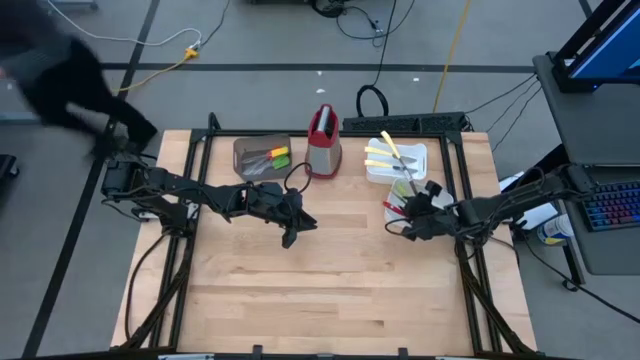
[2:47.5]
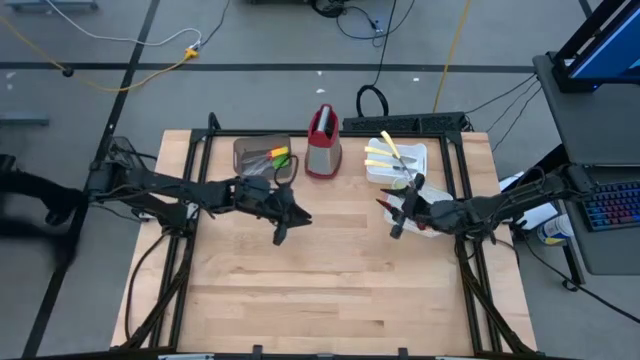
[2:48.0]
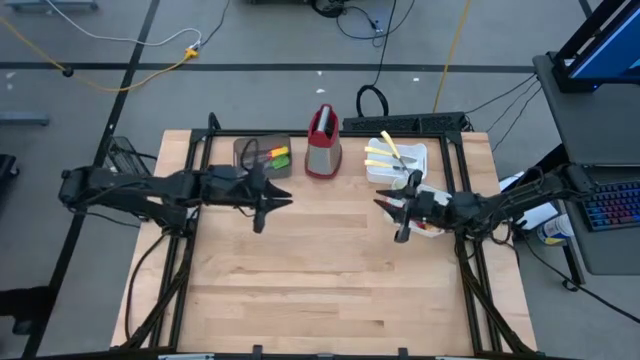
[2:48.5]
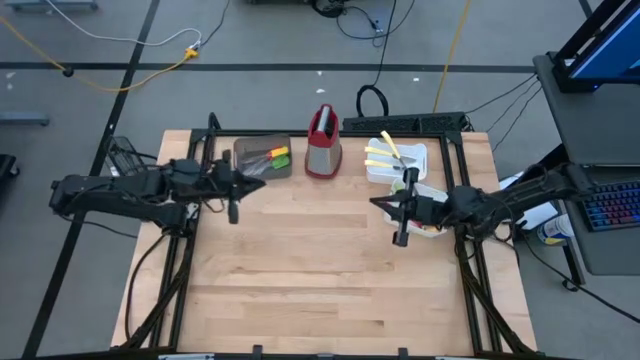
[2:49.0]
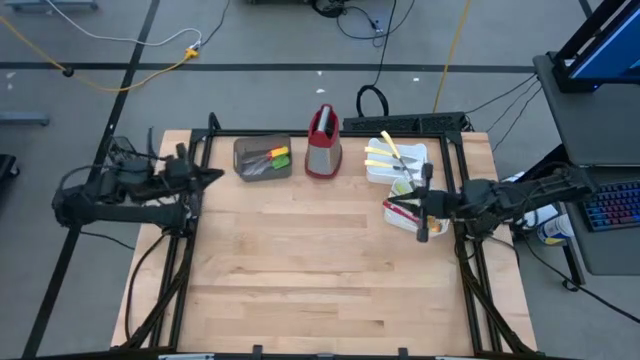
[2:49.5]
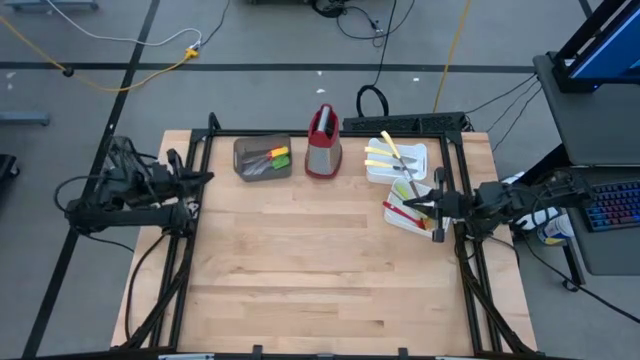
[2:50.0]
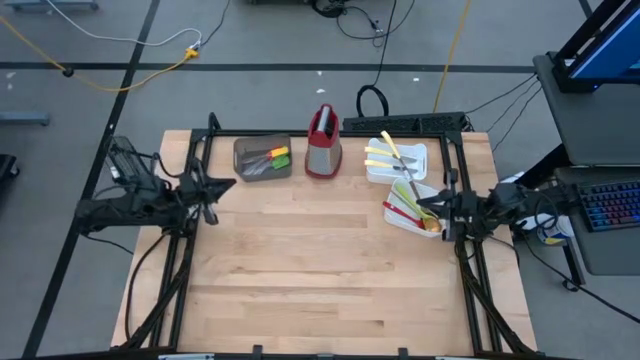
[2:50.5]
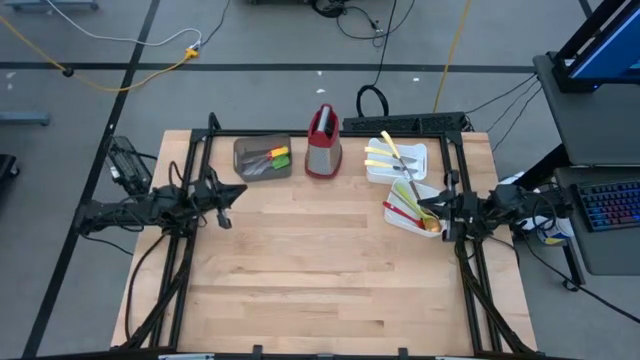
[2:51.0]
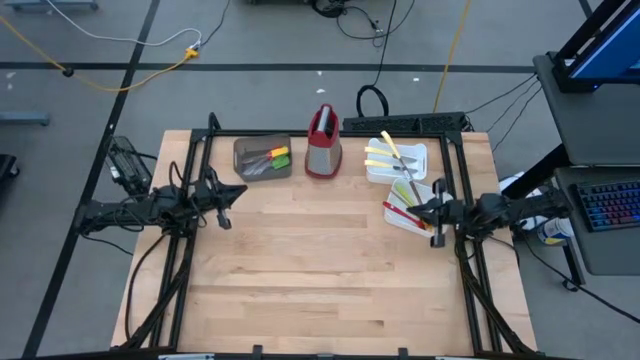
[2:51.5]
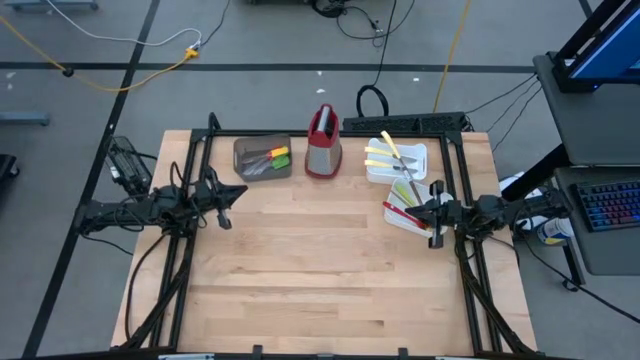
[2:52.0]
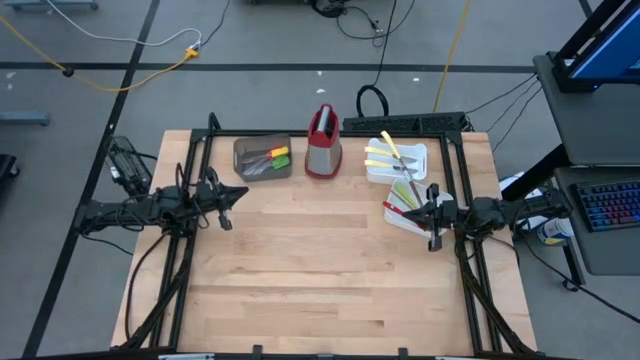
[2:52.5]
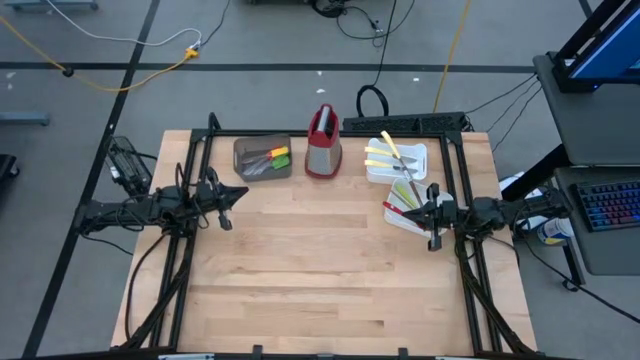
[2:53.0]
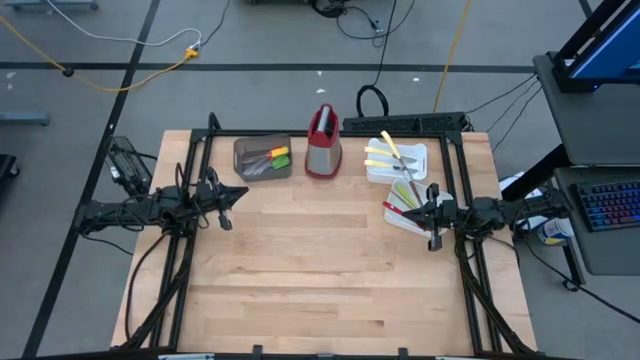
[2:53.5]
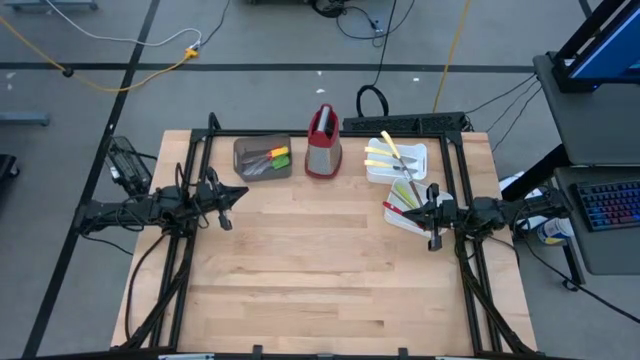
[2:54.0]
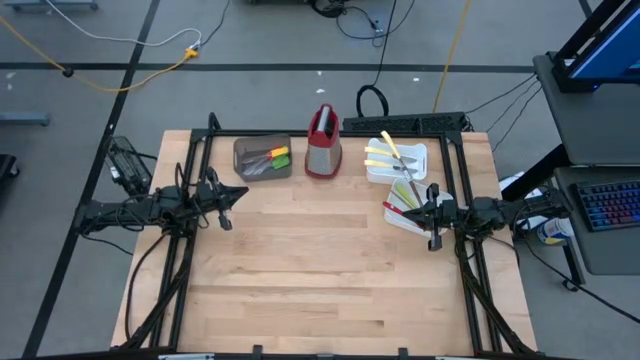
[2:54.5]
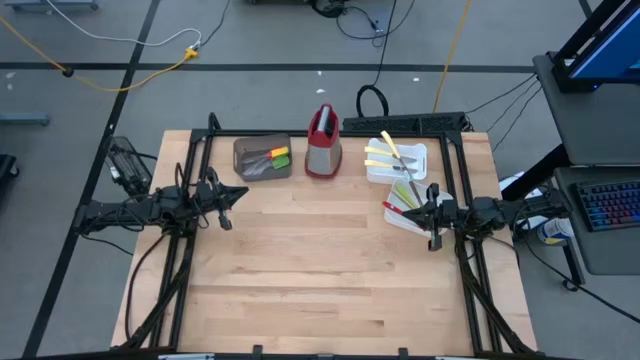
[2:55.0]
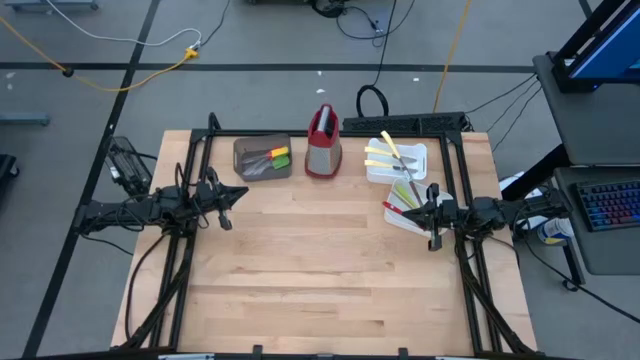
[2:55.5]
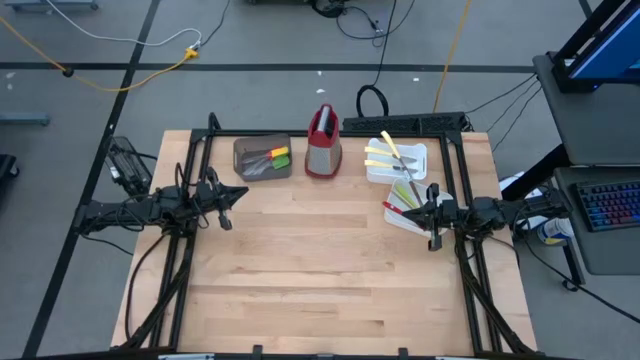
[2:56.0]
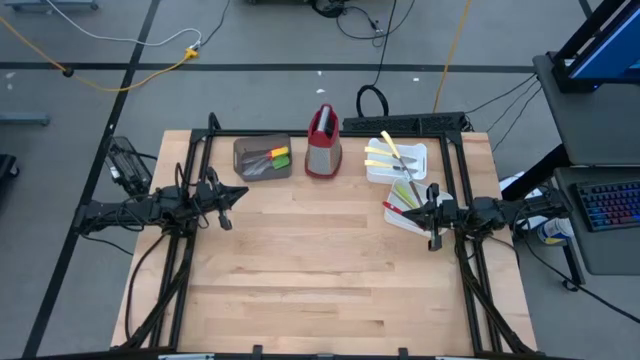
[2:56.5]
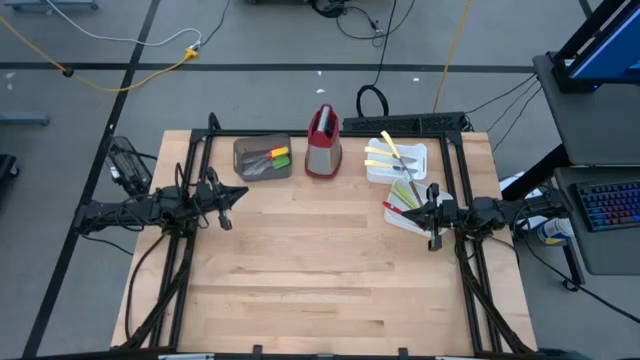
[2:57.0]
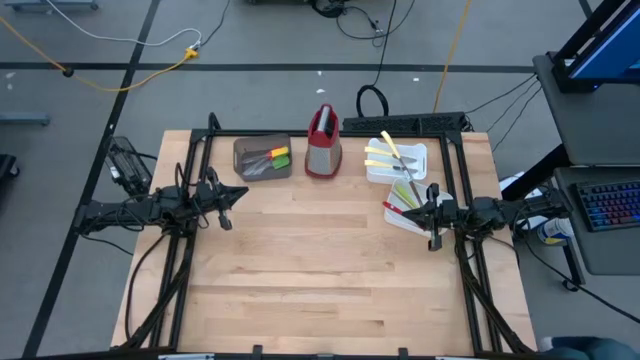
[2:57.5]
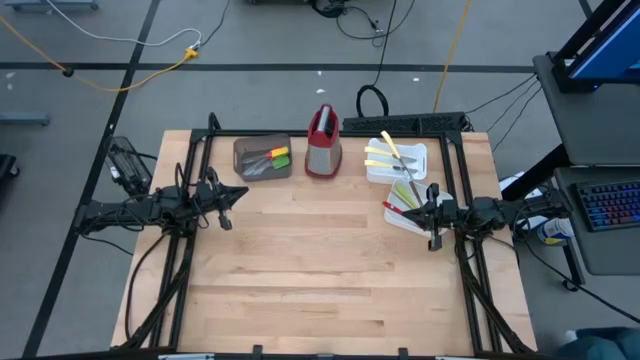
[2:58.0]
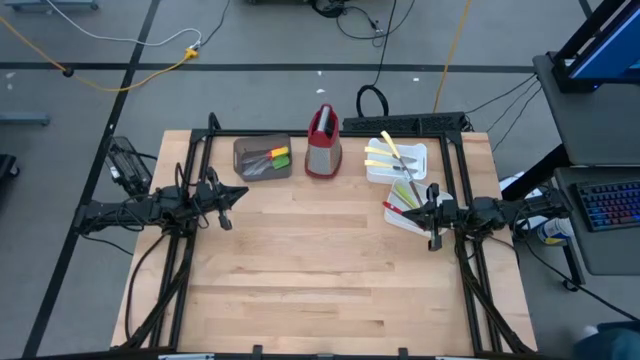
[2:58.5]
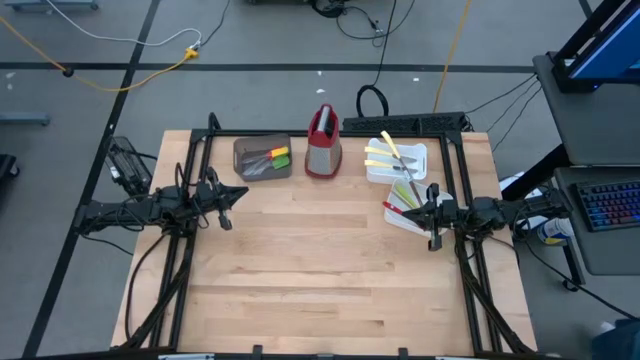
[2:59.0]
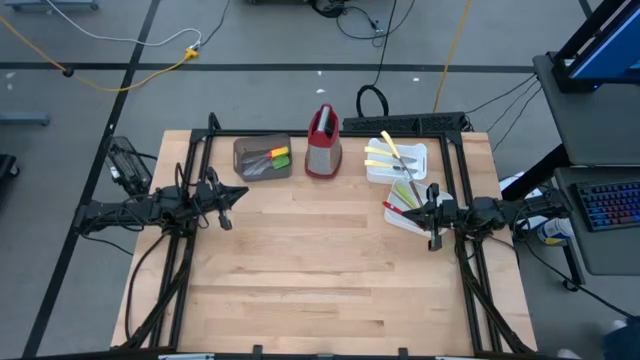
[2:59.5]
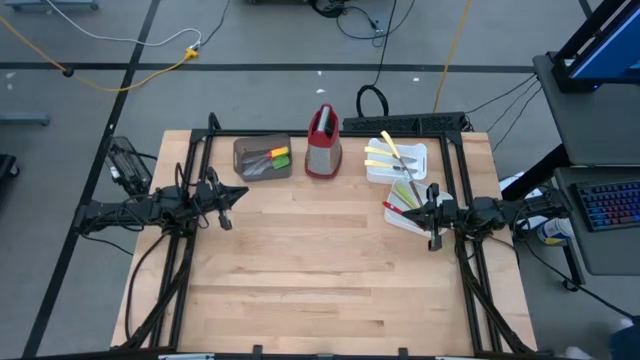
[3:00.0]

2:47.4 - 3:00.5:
Task: Pick & Place Kitchen Items
Return to Home Position

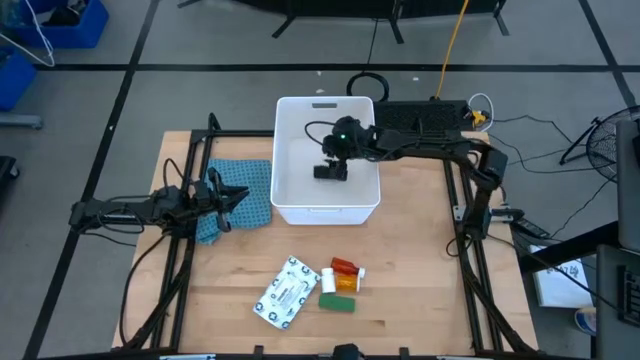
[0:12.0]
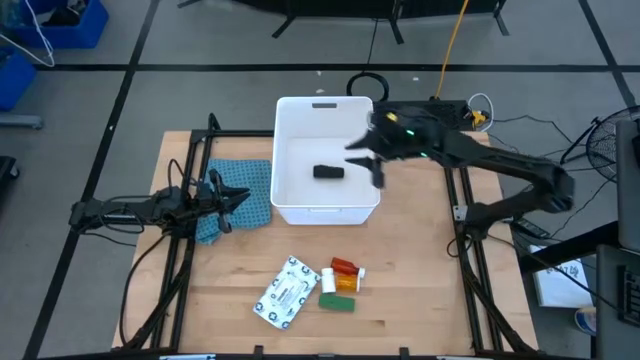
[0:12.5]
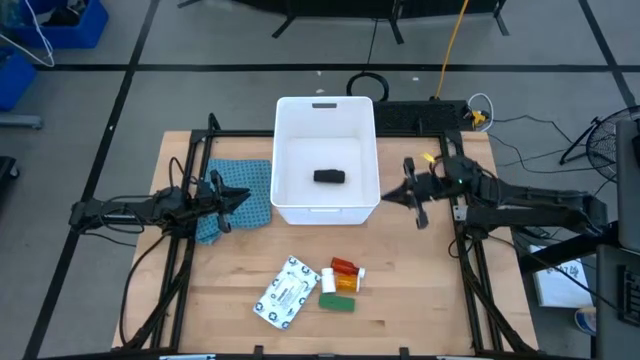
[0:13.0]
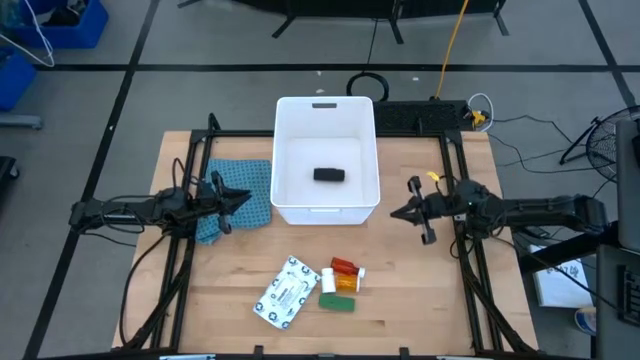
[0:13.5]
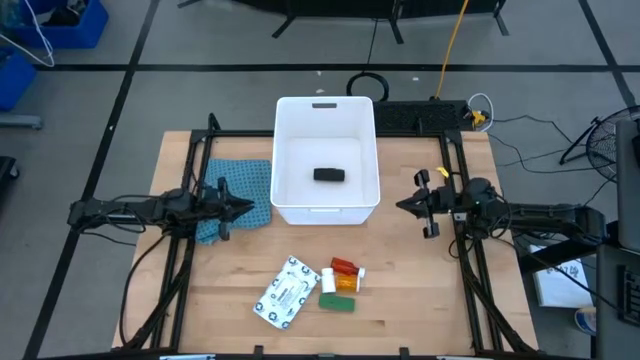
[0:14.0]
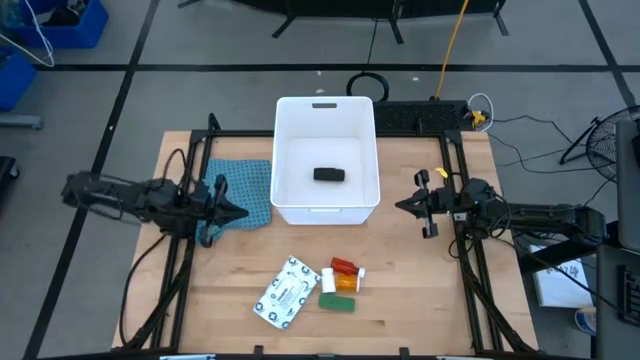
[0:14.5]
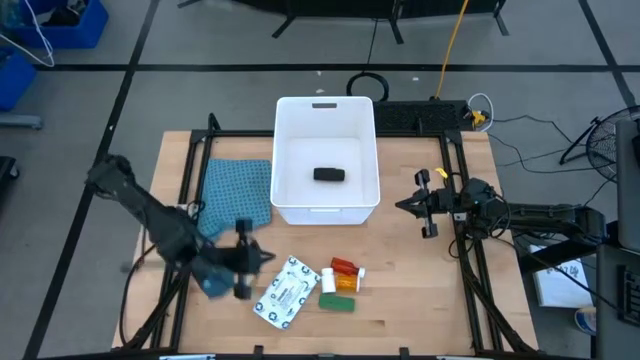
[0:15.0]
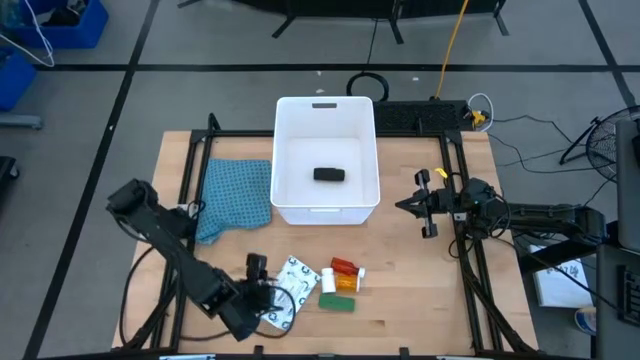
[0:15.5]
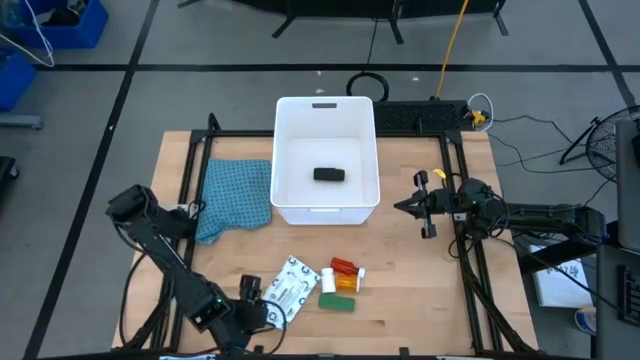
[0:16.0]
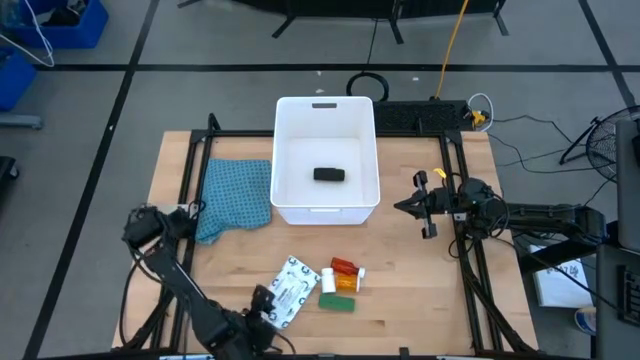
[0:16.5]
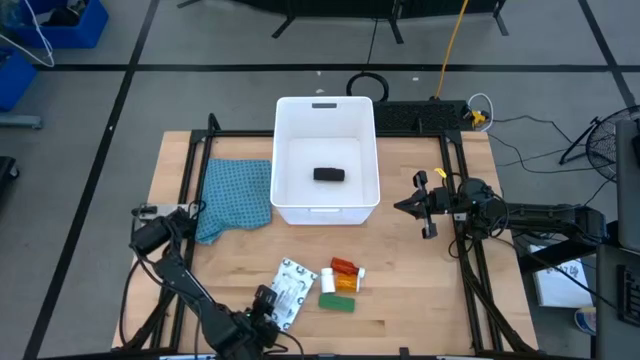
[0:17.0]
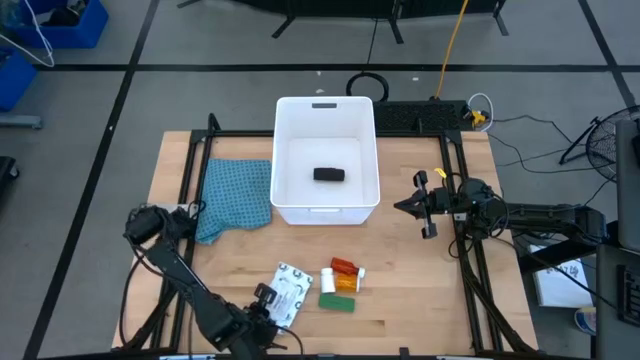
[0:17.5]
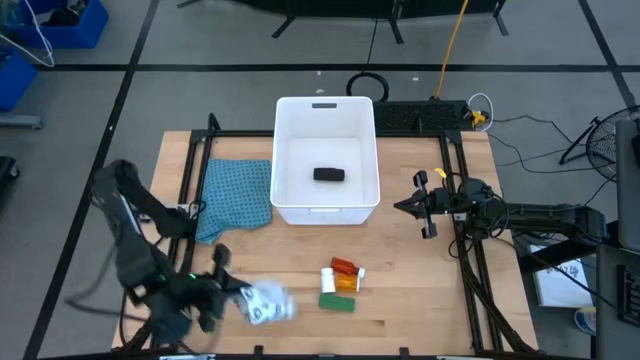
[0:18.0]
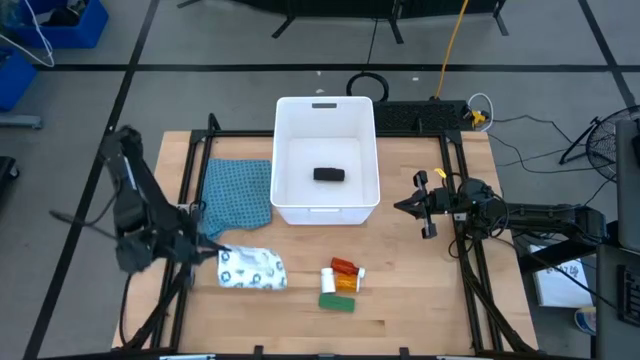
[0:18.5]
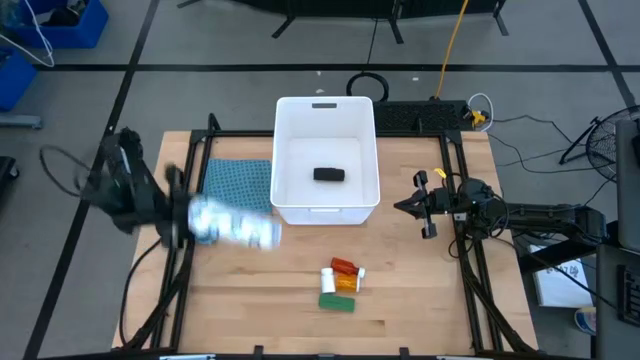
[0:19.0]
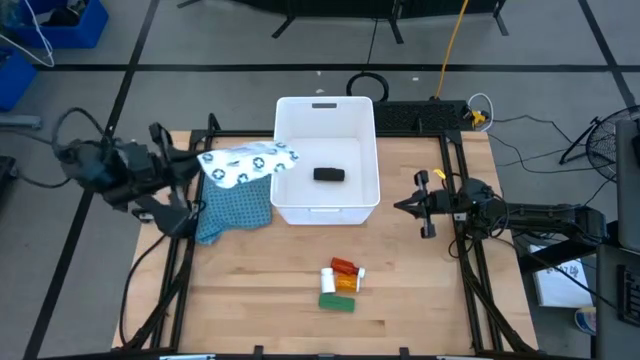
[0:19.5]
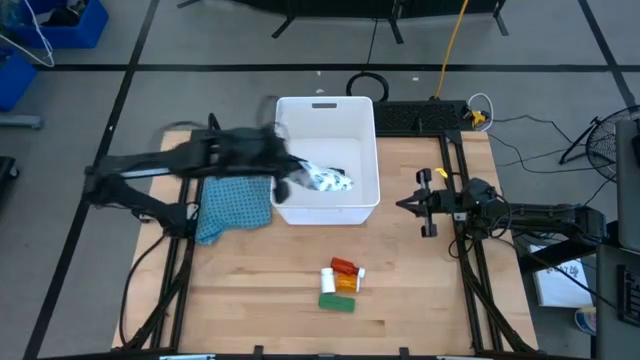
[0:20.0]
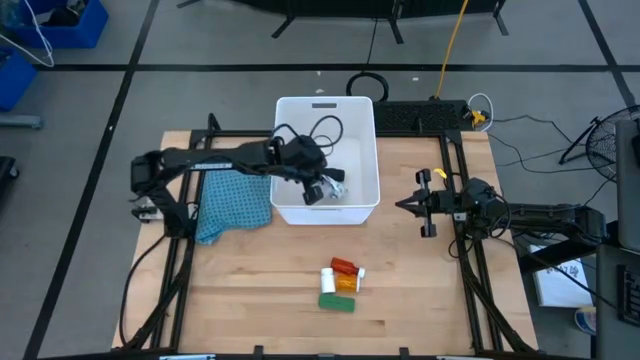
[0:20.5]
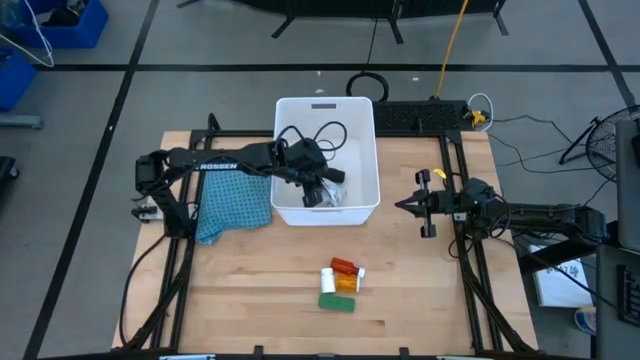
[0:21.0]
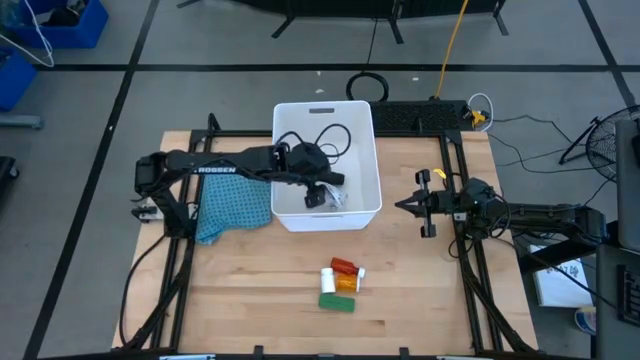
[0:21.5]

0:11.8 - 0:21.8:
Task: Pick & place medical supplies in basket/bin
Put the white mailer bag into the white container
